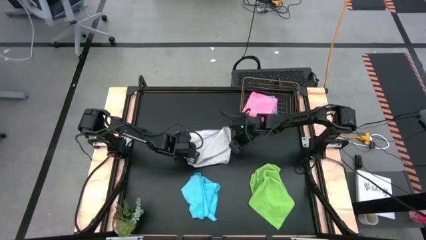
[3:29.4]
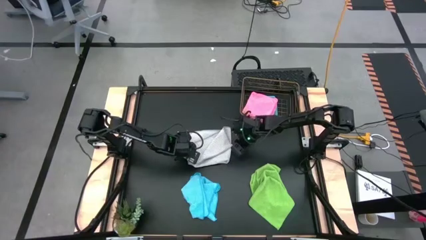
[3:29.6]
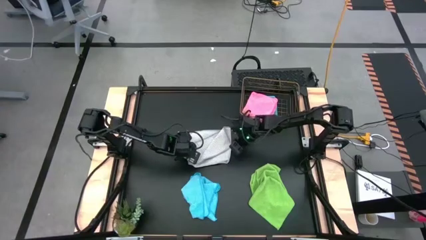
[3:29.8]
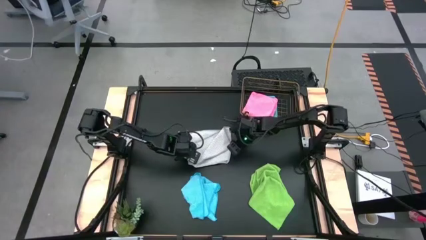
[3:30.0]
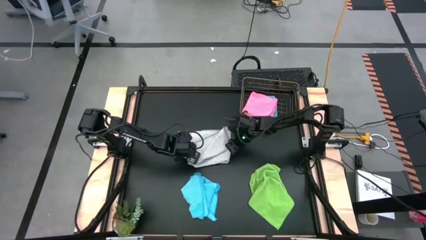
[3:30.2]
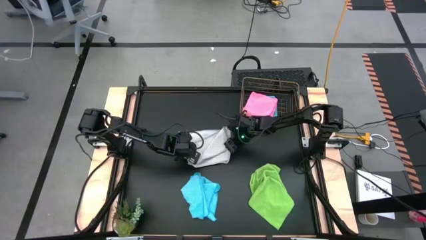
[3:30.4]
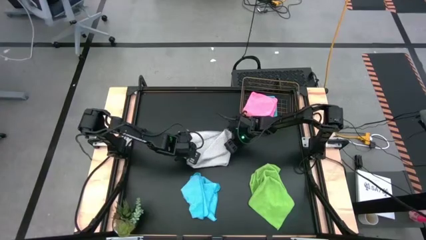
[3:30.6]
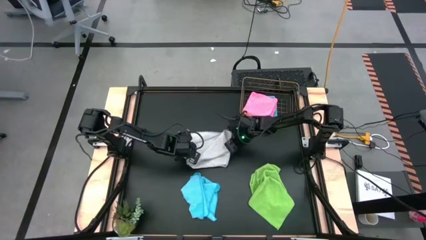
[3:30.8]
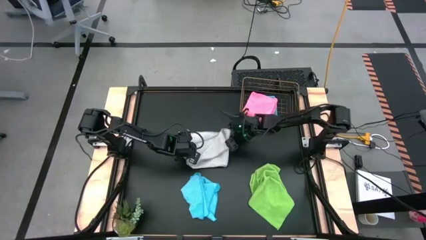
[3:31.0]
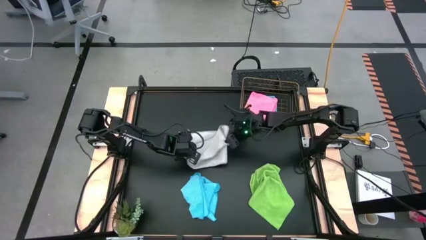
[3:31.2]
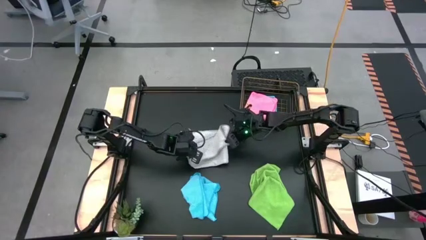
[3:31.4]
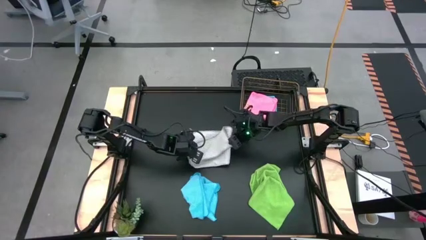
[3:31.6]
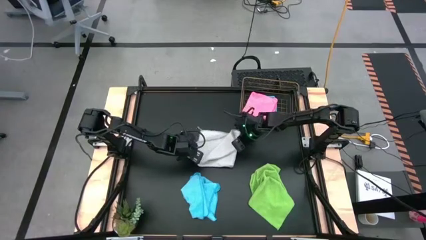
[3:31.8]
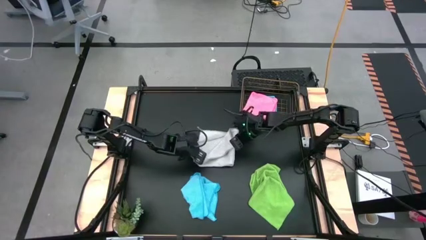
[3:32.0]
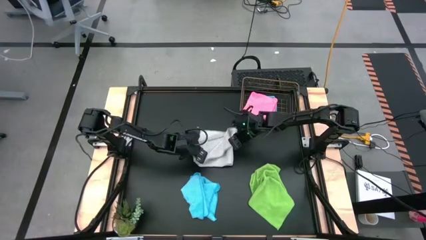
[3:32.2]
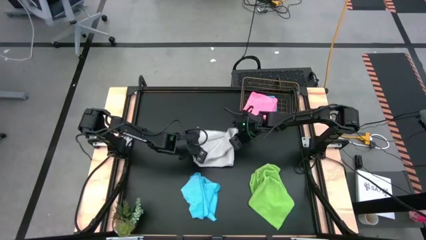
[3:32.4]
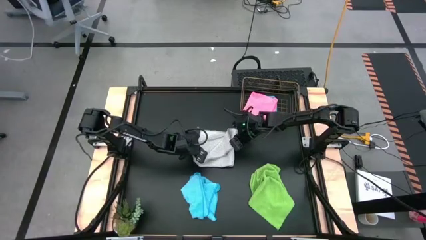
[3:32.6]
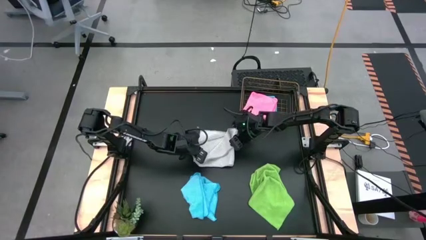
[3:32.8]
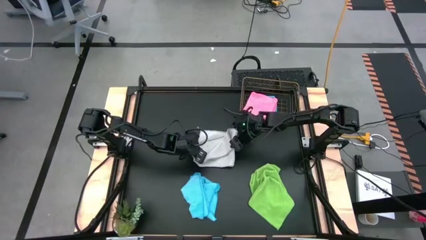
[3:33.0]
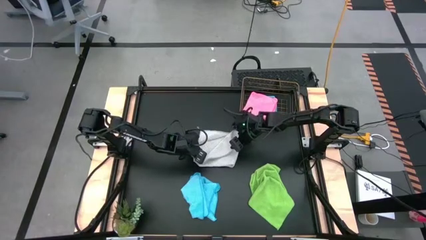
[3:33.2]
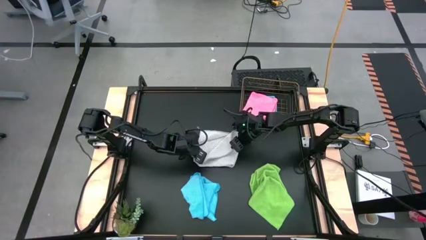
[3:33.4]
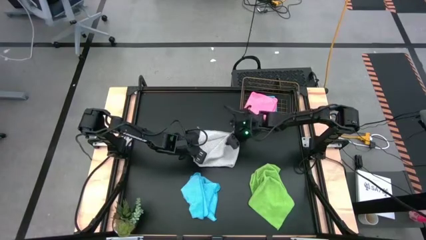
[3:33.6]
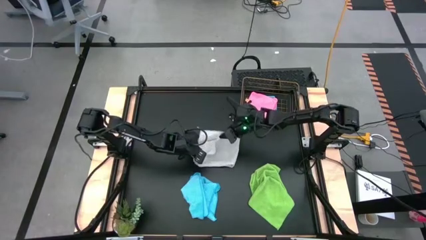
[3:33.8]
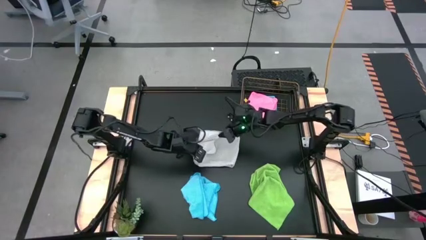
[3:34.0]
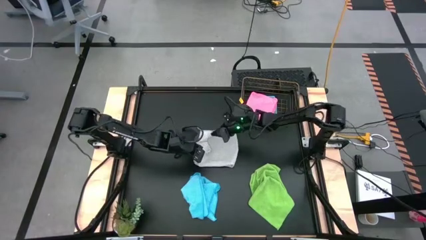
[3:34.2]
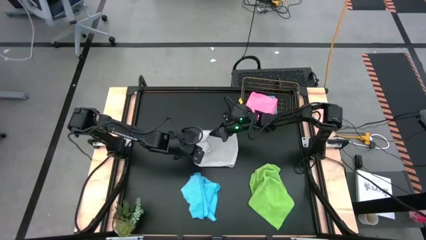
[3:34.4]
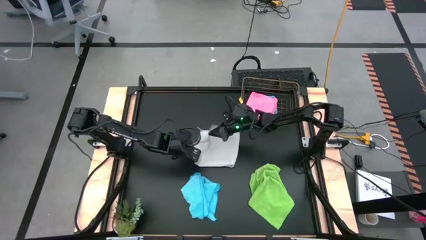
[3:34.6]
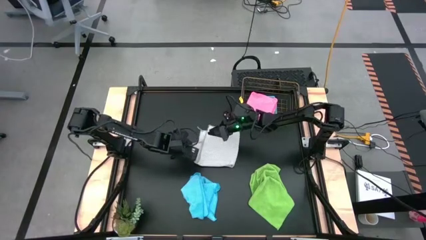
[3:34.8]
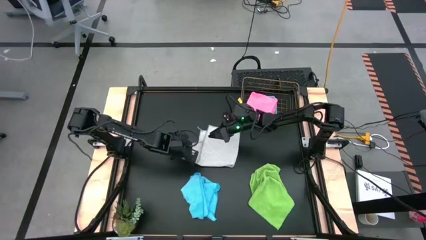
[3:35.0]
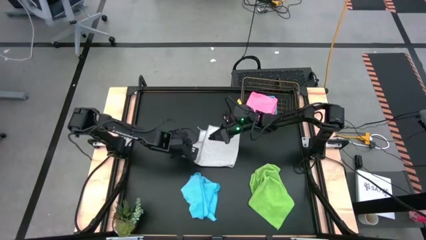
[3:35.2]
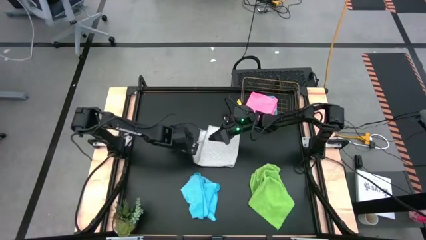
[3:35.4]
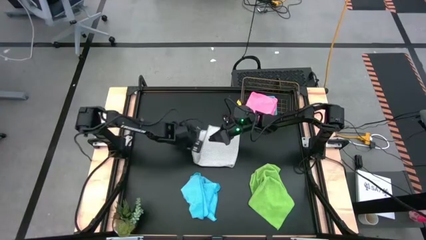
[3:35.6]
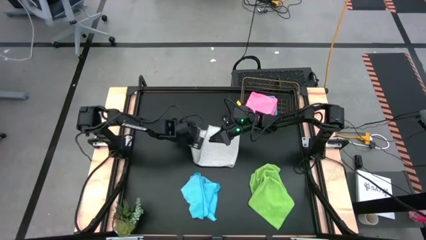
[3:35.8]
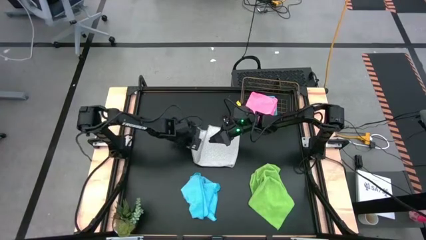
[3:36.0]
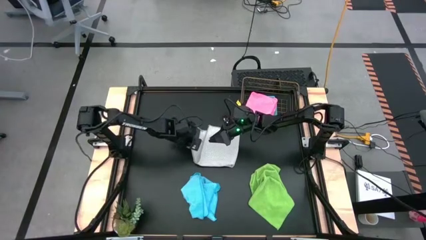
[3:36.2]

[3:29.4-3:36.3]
Task: Fold microfiber towels
Fold the gray towel

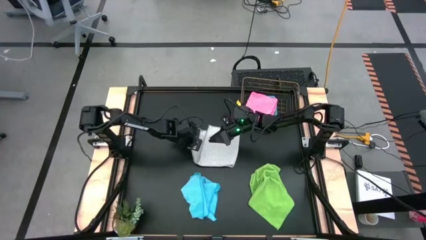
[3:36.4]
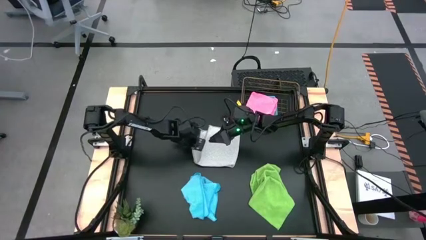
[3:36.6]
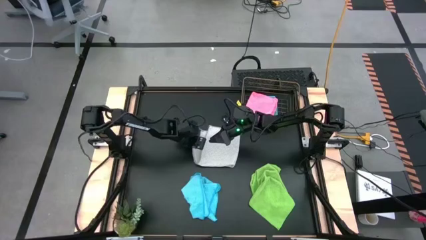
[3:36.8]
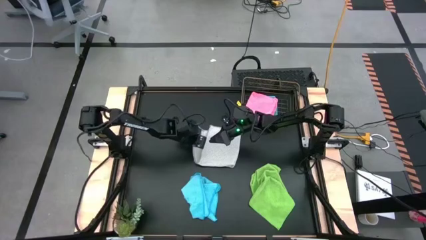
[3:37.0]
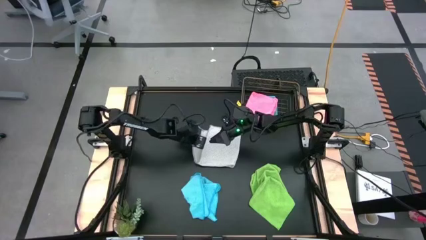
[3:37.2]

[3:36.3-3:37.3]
Fold the gray towel

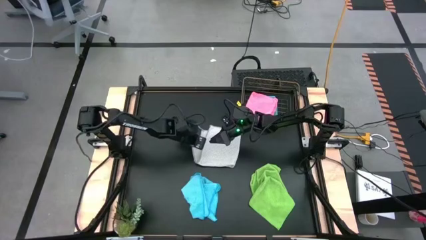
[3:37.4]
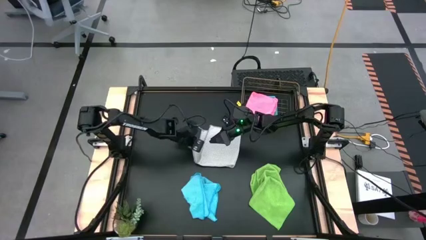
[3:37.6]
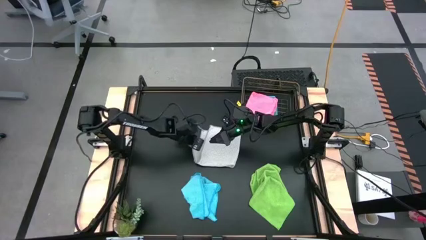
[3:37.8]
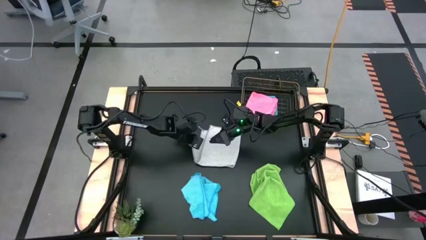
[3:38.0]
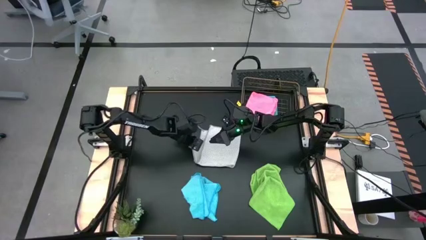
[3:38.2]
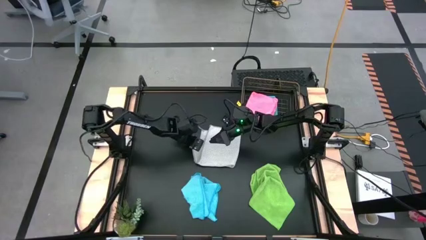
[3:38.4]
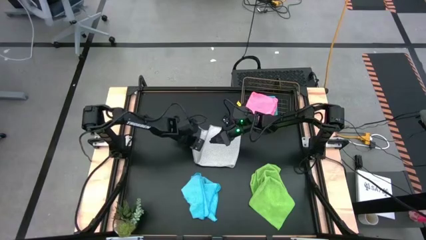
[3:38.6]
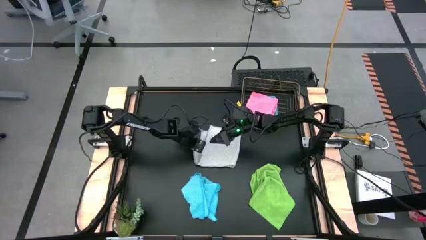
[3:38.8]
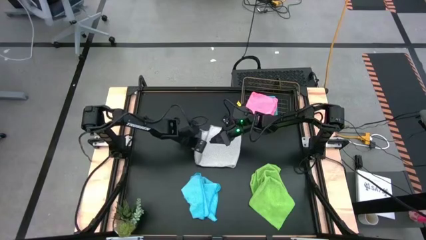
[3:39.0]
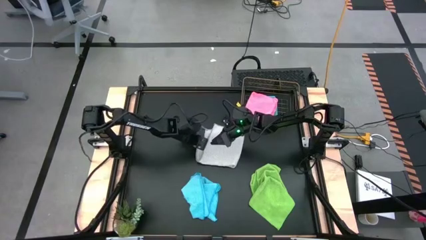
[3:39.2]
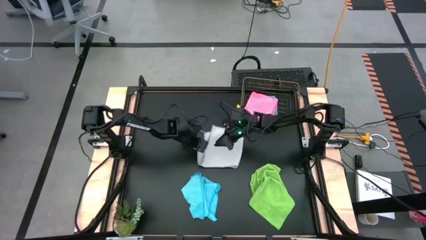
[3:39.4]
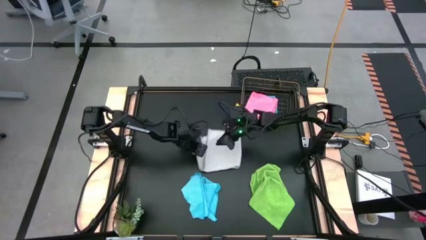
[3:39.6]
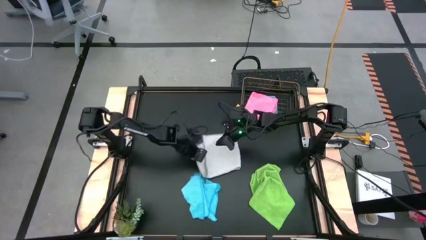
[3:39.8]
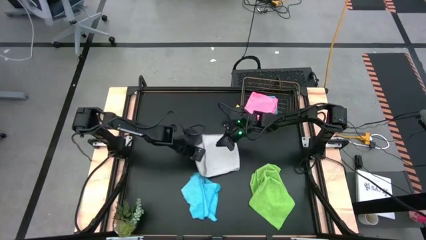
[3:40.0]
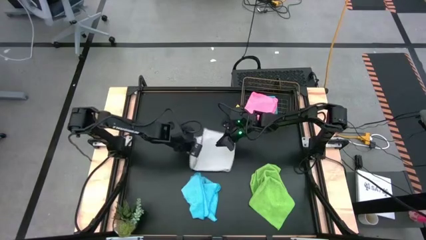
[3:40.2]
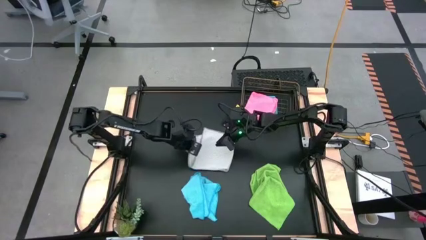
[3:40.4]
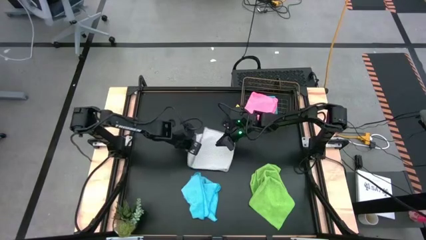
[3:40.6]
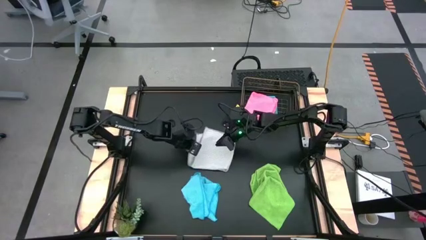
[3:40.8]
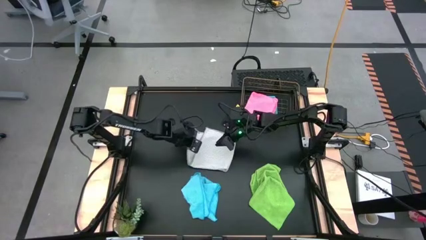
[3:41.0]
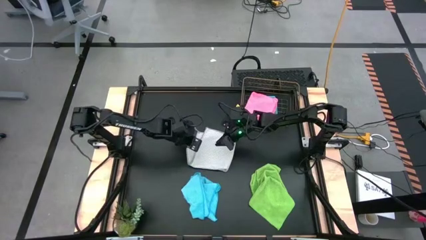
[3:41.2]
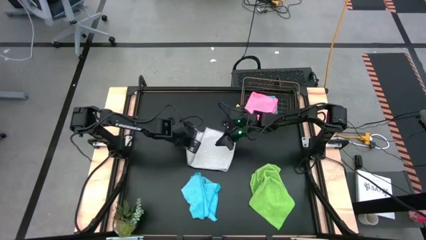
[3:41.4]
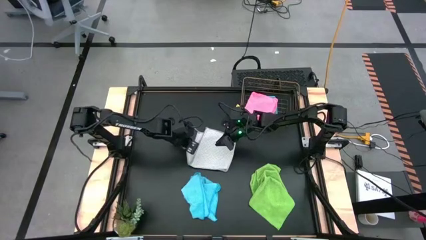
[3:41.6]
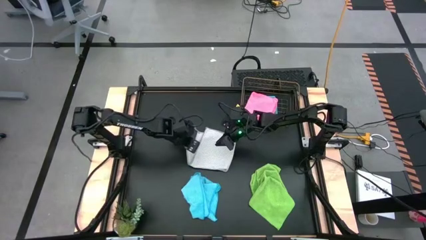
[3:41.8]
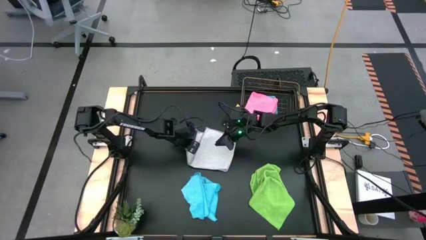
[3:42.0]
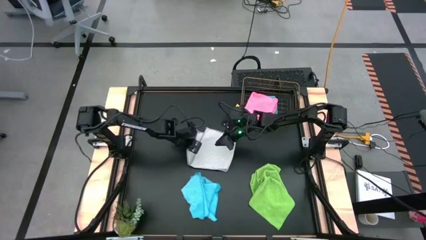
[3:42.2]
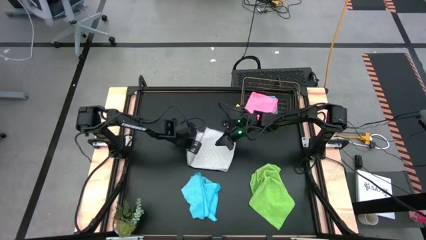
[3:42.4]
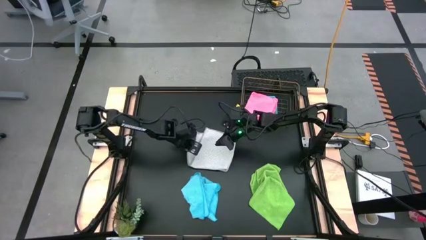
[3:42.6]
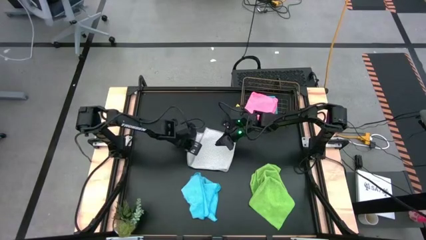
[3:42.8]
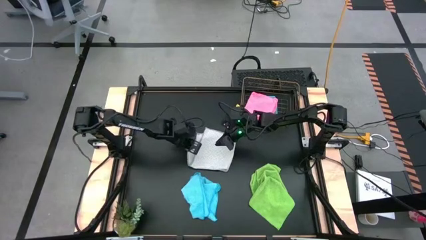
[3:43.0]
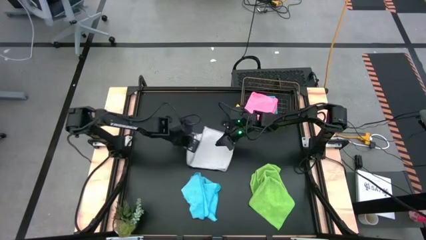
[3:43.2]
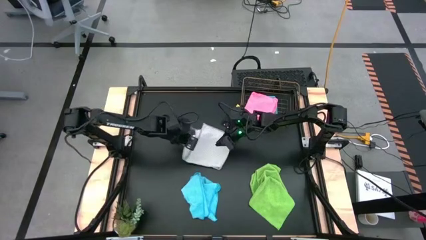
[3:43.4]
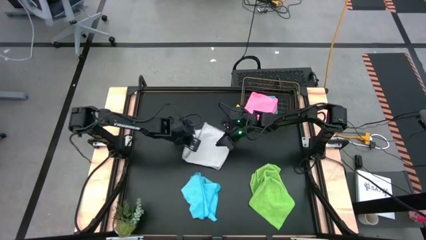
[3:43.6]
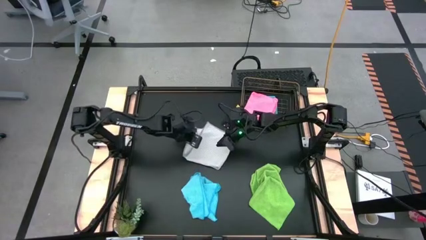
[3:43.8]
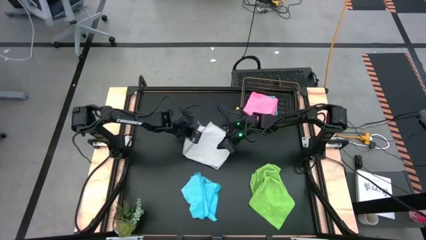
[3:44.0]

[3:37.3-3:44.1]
Fold the gray towel

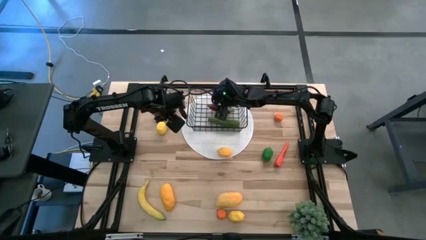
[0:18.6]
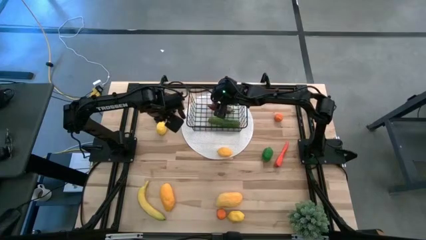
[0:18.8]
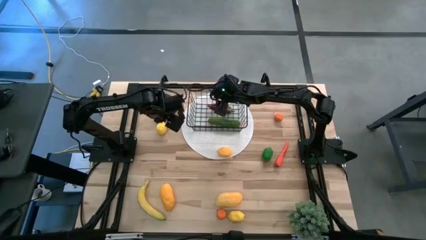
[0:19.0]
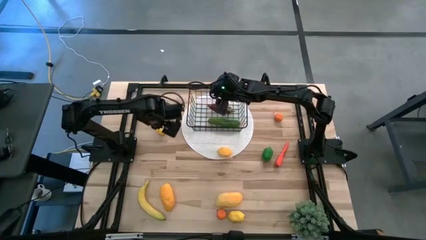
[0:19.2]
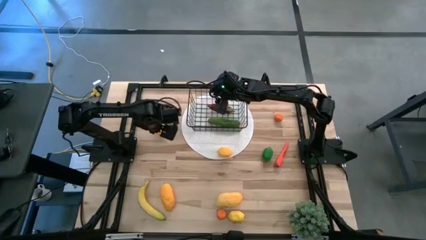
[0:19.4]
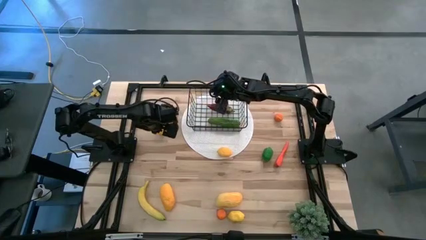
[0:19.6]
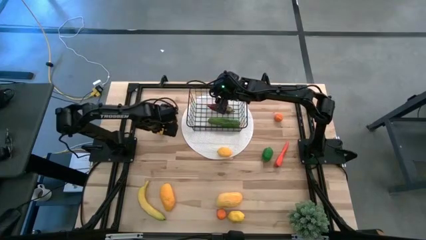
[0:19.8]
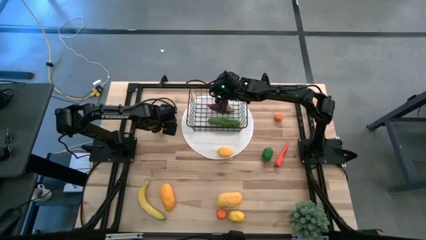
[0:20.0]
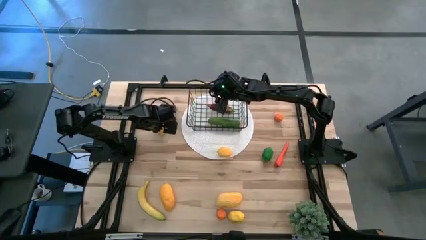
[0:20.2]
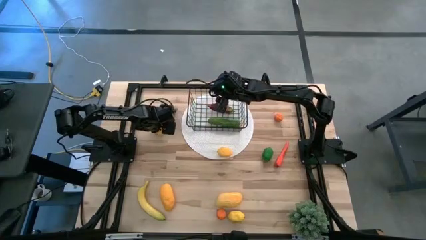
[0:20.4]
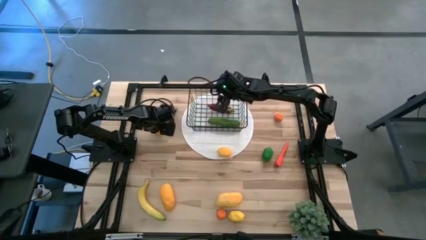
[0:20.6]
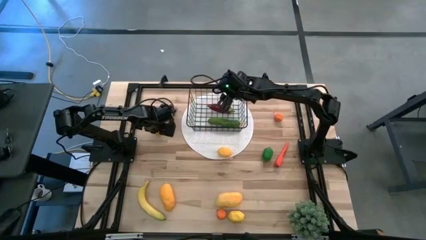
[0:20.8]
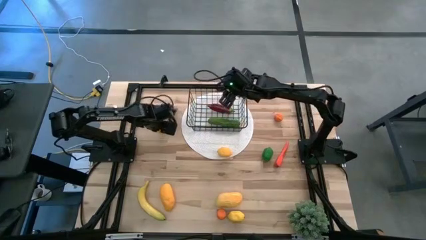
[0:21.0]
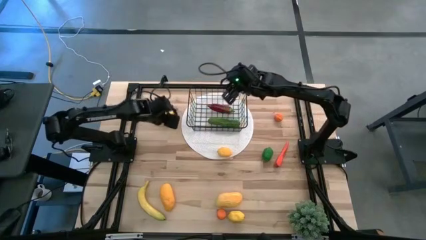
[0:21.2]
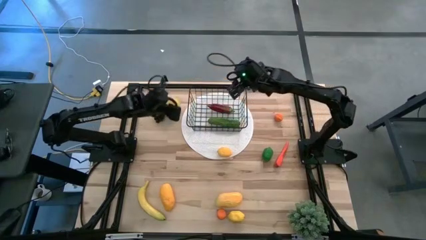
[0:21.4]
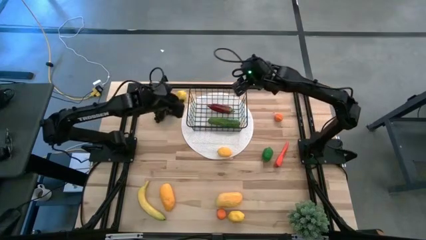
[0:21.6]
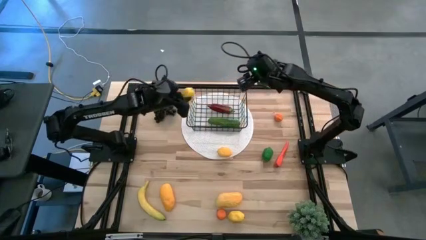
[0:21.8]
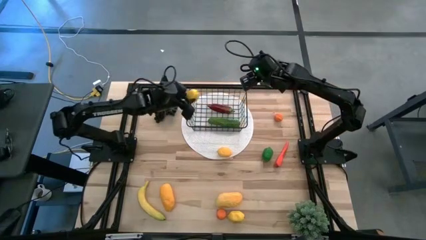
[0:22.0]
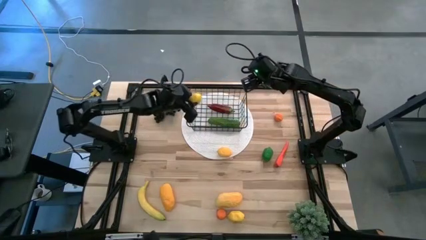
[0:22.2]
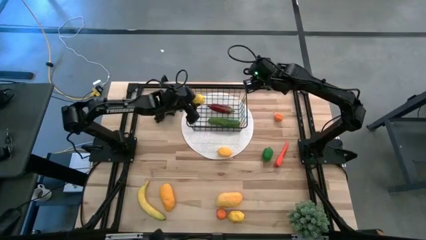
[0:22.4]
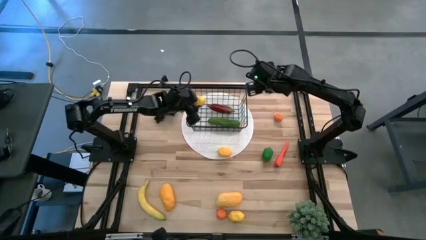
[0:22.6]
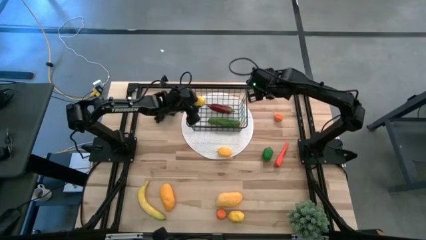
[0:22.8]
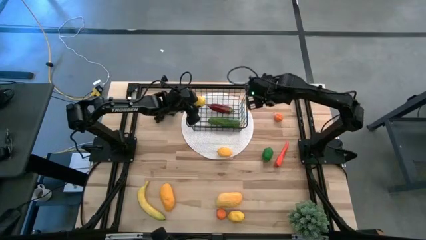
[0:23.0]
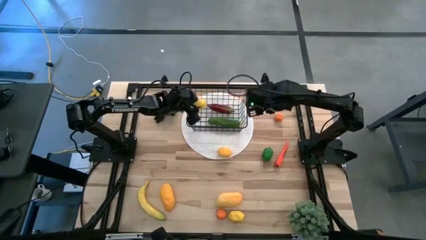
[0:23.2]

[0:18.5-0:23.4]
Task: Build produce basket
Put the top yellow lemon into the black wire basket
